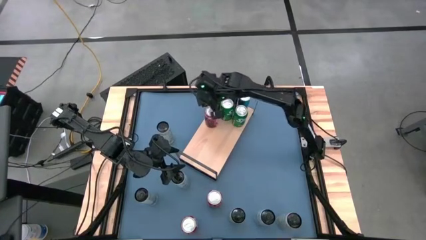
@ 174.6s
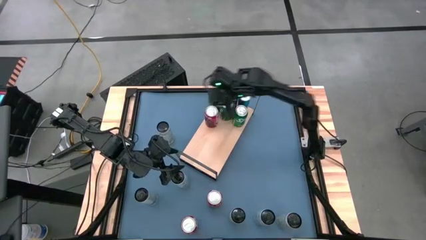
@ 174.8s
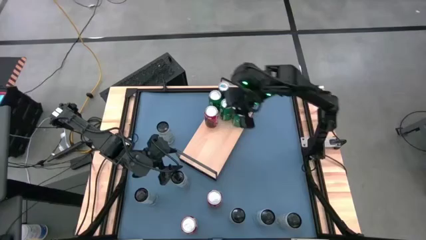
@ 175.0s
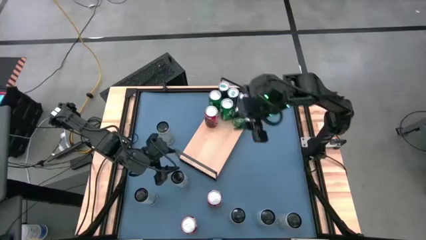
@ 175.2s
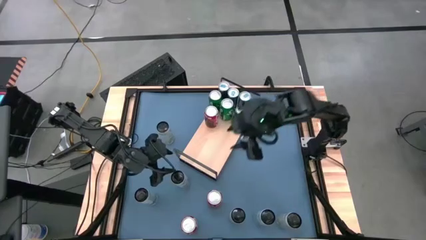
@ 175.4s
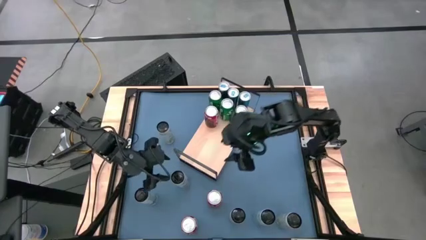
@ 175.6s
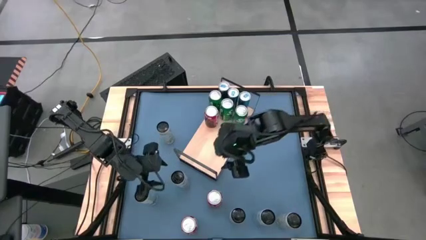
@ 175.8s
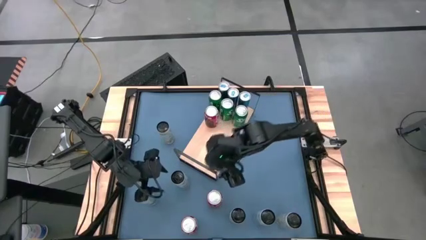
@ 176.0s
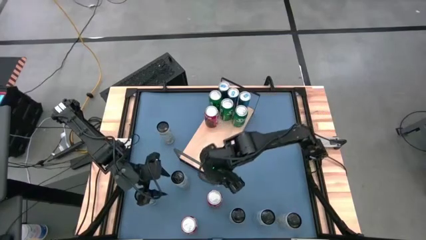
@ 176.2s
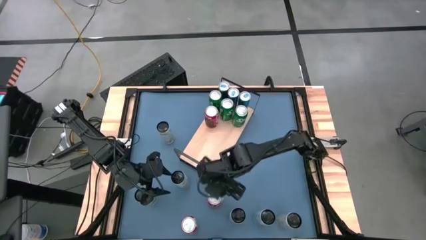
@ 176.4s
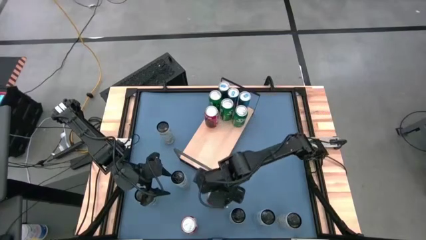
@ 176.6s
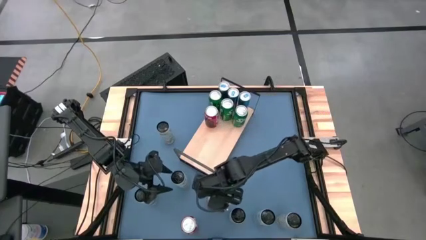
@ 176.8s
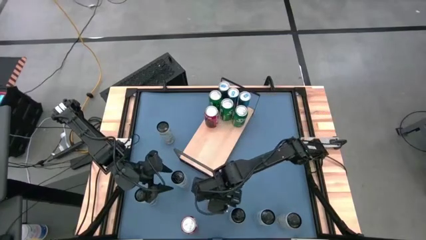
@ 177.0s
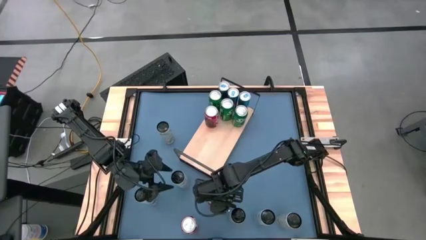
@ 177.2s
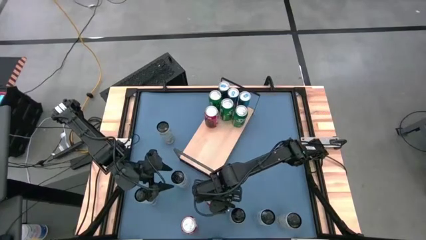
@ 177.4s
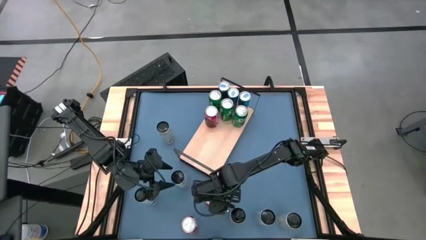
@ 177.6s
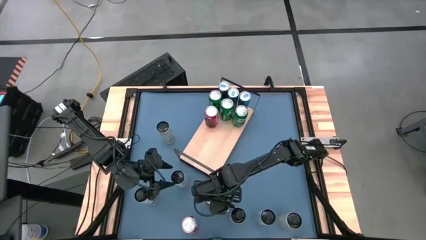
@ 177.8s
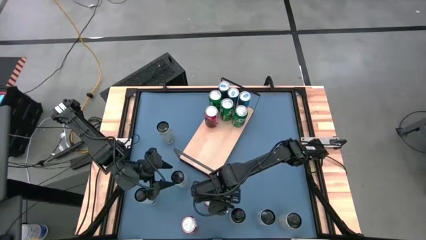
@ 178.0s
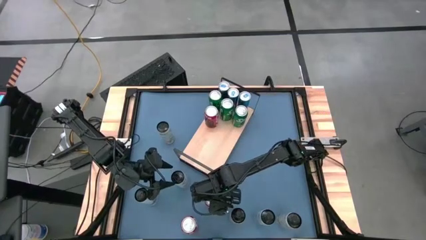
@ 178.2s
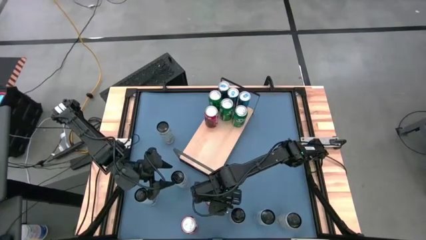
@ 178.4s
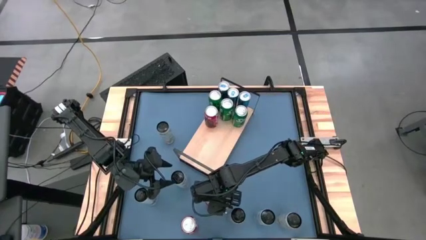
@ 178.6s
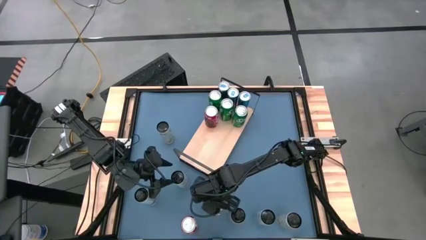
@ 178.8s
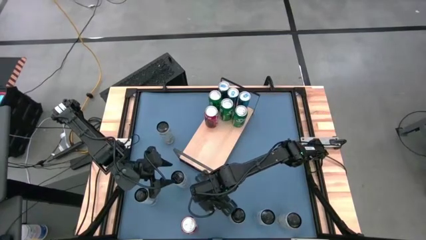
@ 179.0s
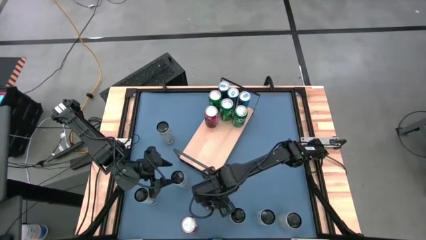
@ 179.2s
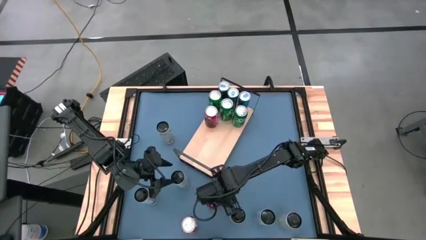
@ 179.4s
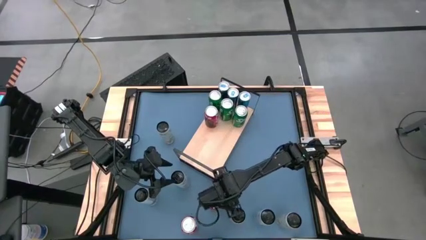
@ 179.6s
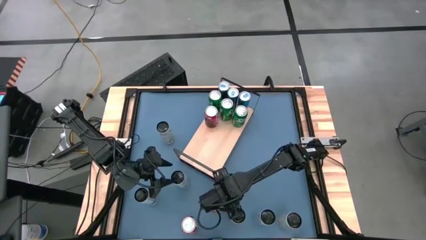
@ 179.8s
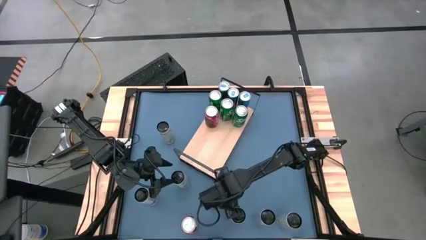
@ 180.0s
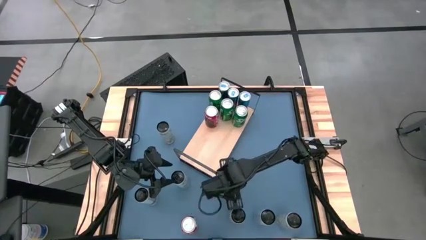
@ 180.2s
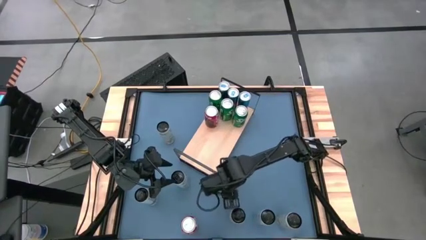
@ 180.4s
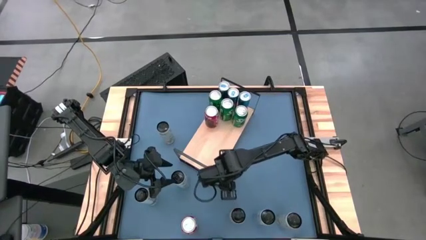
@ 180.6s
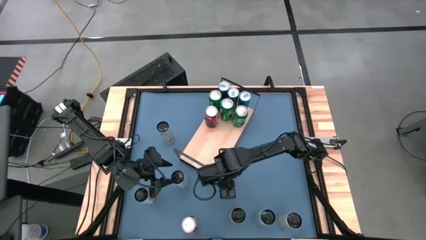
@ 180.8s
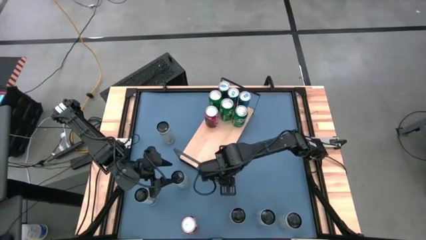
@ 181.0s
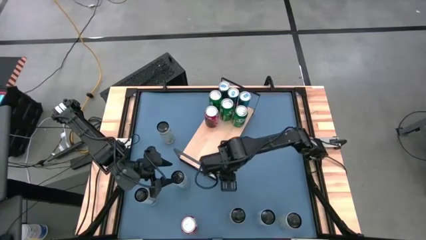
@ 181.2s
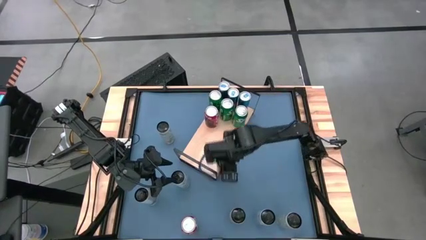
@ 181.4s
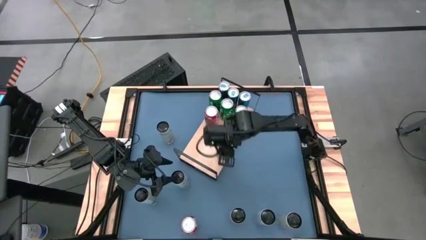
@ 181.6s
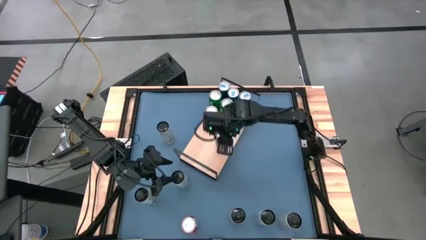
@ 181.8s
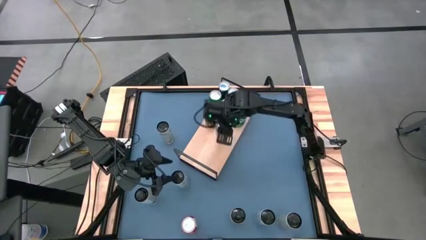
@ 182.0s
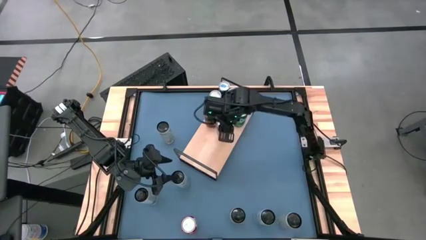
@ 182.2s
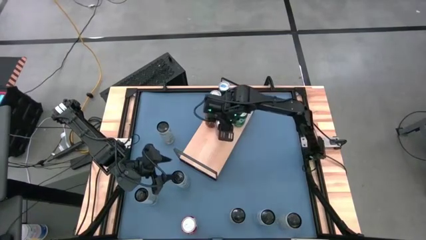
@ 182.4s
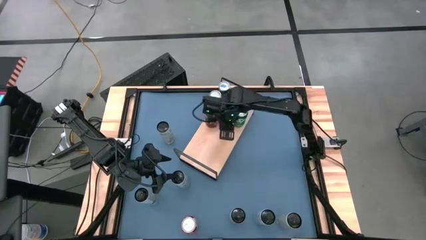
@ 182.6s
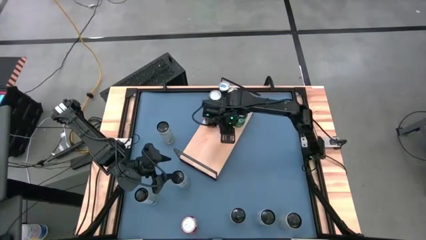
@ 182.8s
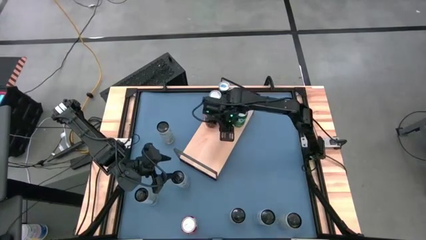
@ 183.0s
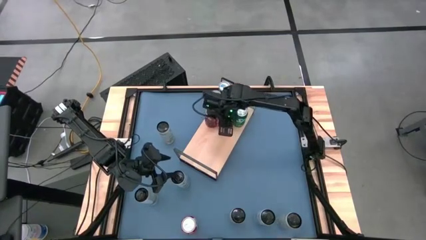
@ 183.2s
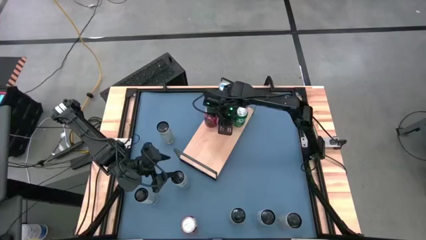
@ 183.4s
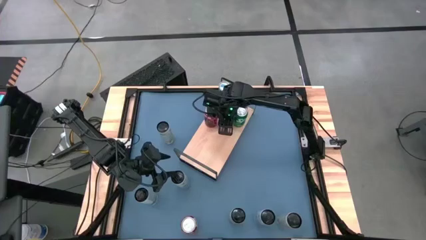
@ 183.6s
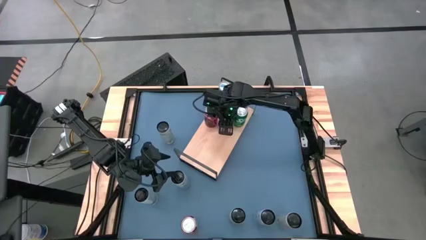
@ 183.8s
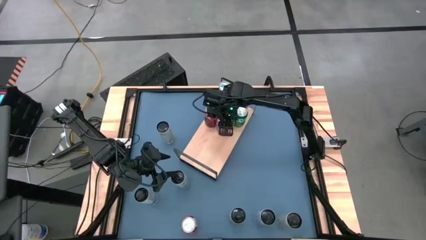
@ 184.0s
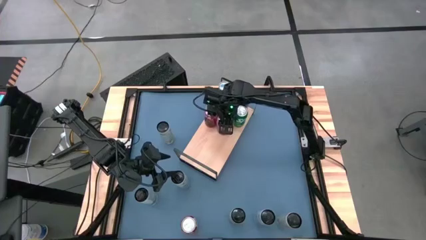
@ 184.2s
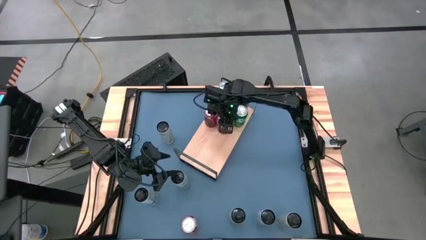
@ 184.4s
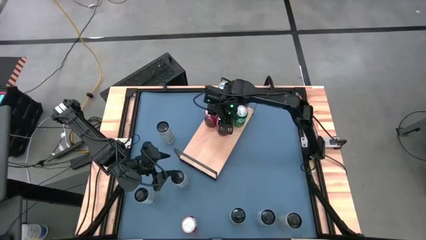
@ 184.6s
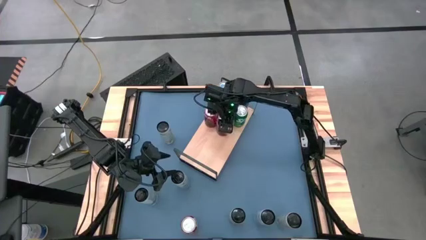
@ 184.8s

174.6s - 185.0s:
Task: Place canned beverage on shelf
Put top red soda can on the shelf aligned with the other red soda can

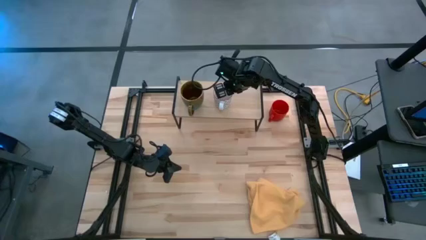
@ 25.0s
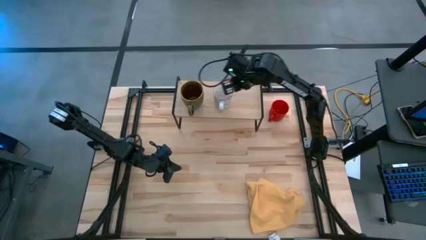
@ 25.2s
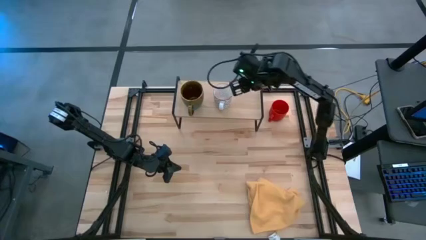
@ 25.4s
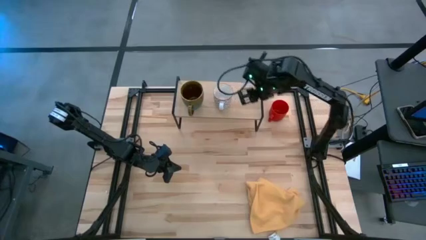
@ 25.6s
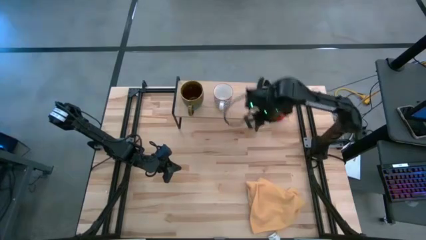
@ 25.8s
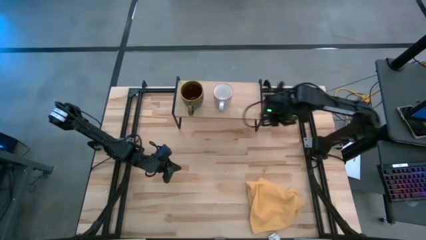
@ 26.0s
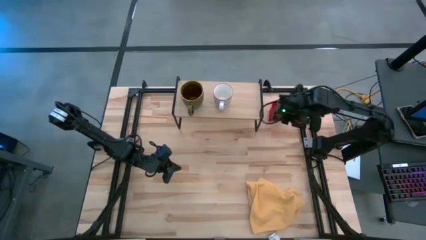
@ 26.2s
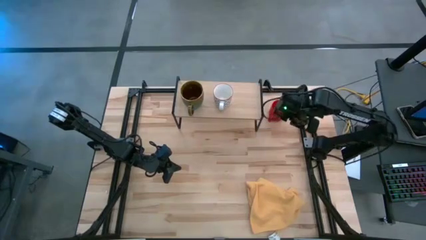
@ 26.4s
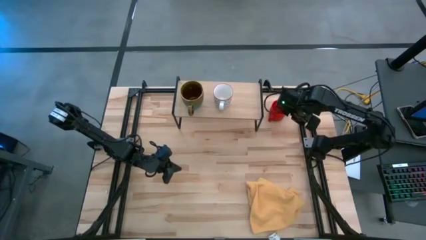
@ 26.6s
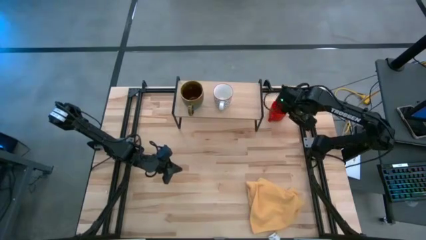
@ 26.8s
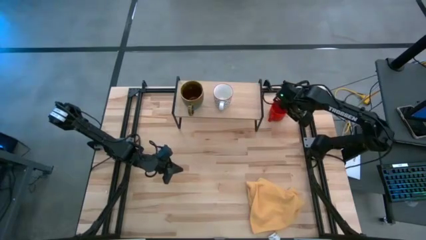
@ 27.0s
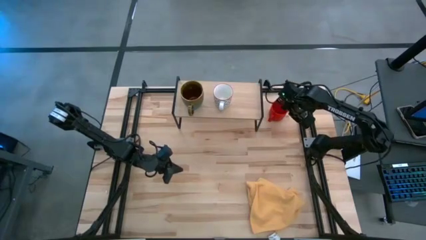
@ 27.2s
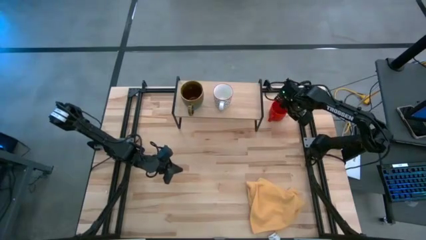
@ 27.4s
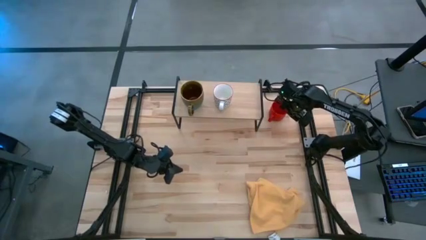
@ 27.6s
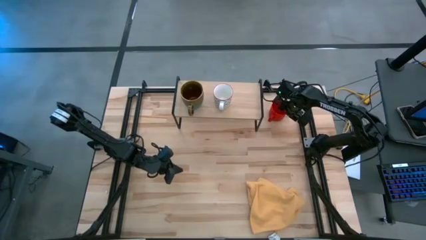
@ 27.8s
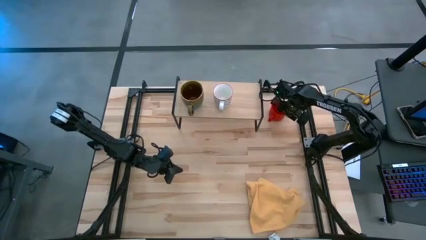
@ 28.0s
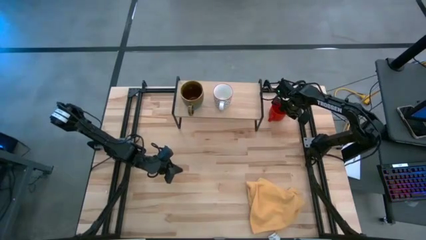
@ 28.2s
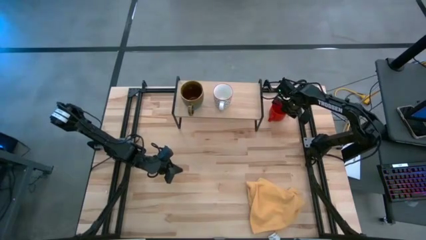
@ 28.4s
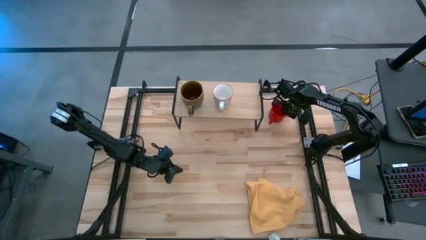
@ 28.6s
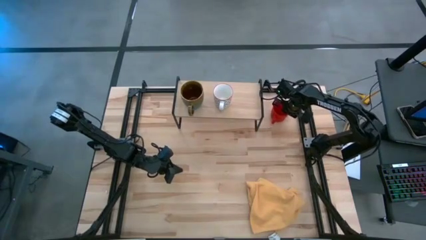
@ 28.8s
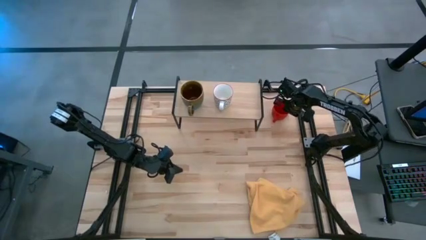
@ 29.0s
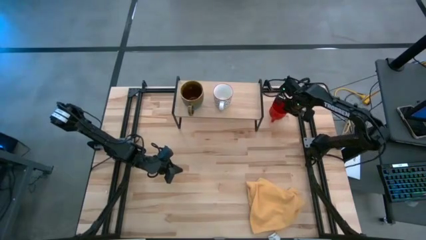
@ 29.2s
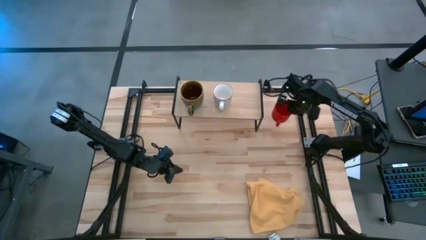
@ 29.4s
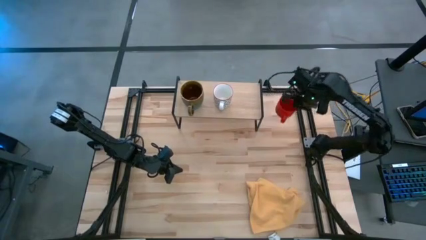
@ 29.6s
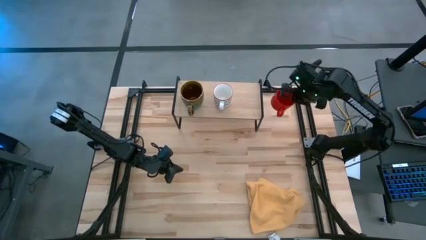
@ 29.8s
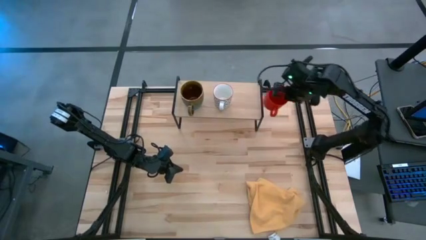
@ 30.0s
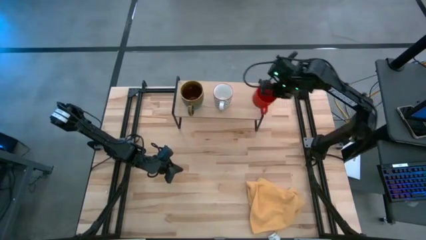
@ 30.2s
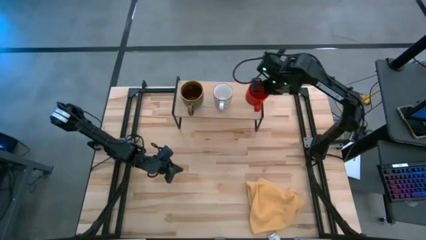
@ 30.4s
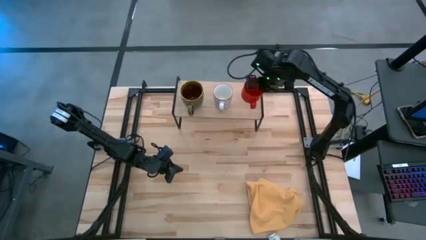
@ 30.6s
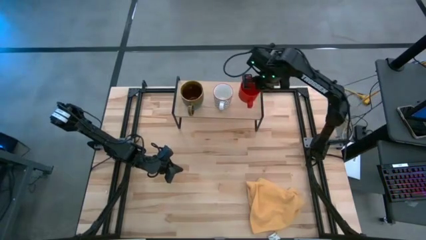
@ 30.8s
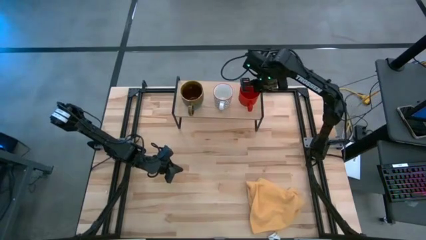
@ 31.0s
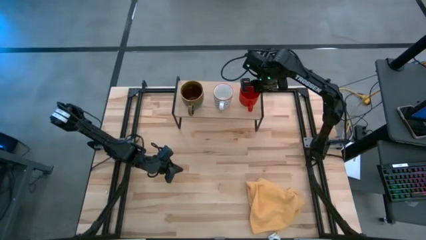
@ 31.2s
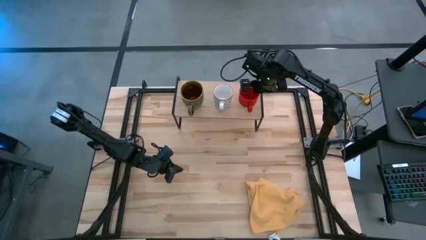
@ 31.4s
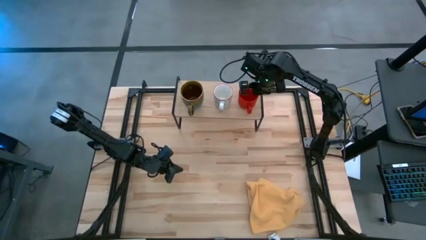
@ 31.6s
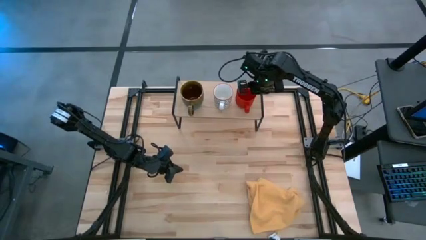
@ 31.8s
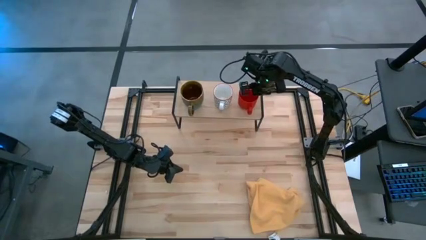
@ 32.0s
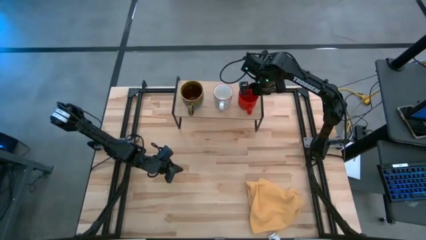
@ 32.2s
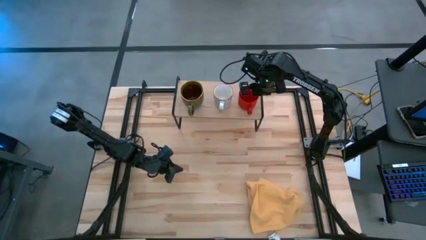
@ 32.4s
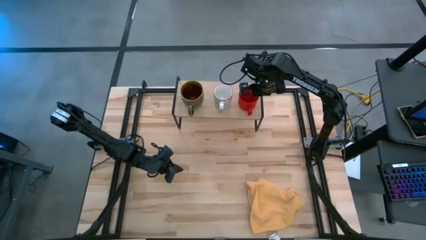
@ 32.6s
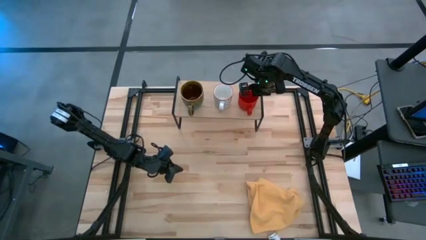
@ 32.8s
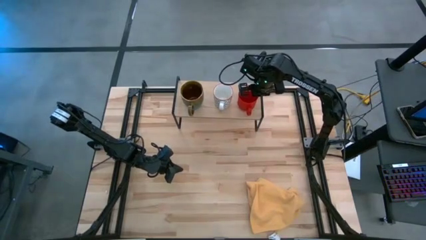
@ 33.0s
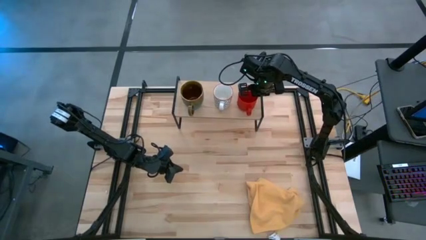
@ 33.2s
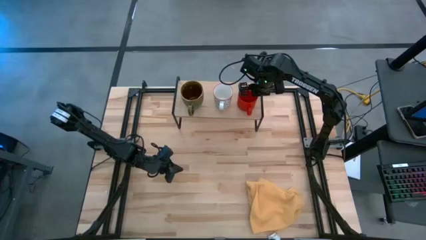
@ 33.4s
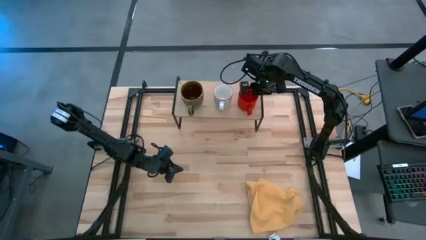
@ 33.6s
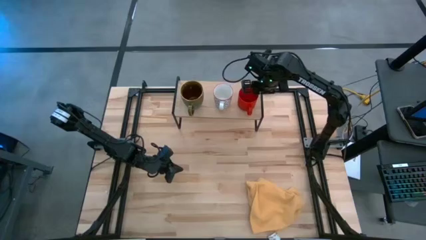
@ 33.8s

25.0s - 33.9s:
Task: Stack small to large cups/mugs on shelf
Put the red mug on the shelf
